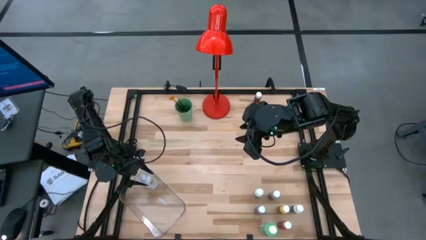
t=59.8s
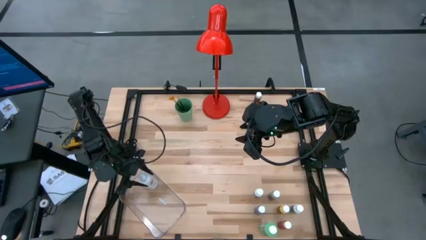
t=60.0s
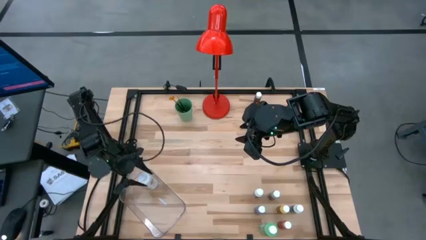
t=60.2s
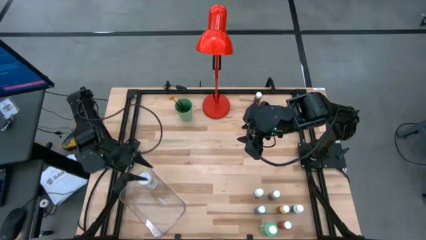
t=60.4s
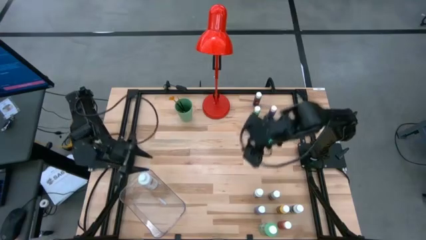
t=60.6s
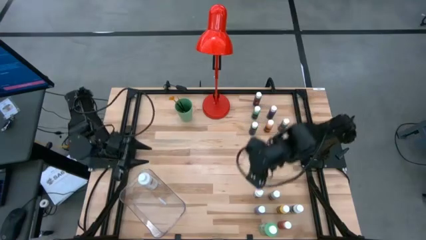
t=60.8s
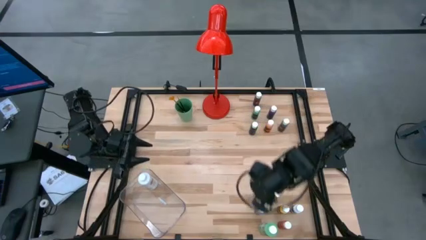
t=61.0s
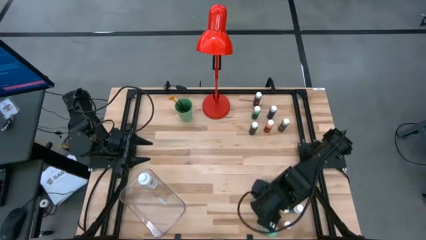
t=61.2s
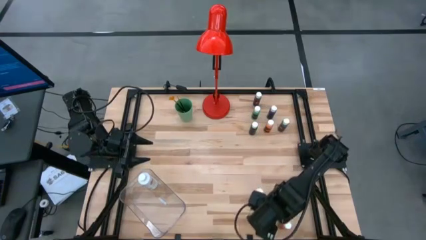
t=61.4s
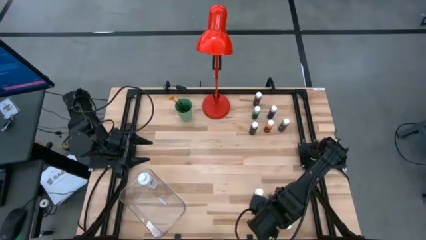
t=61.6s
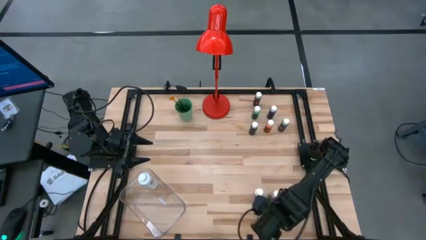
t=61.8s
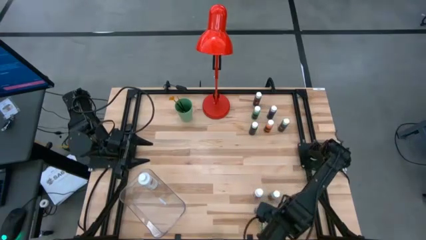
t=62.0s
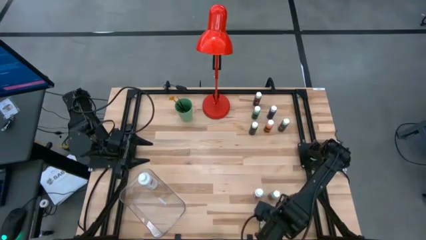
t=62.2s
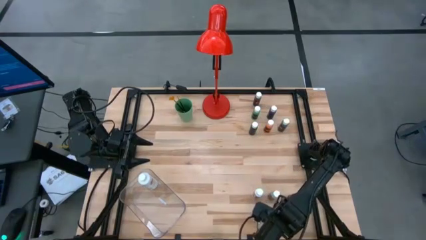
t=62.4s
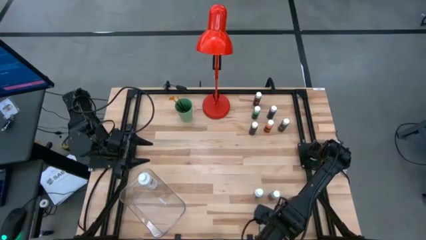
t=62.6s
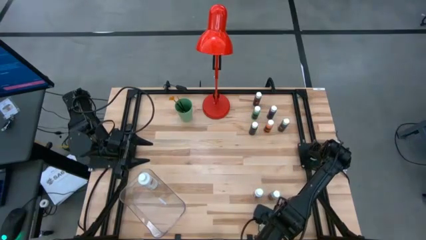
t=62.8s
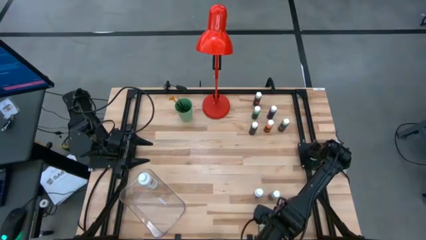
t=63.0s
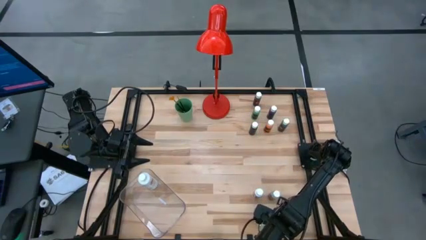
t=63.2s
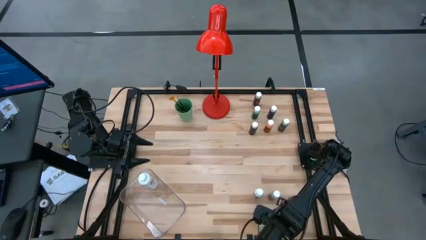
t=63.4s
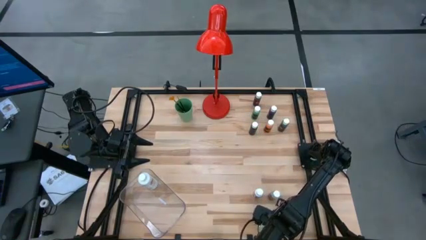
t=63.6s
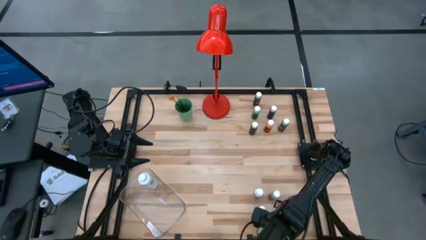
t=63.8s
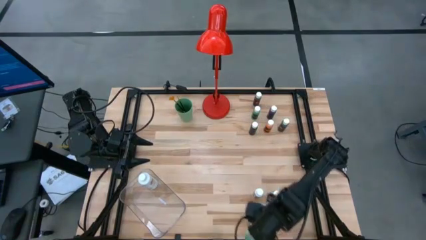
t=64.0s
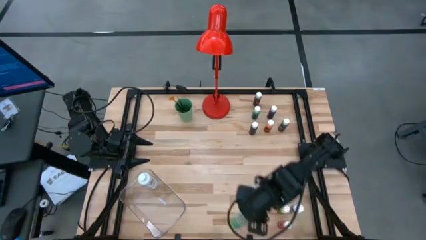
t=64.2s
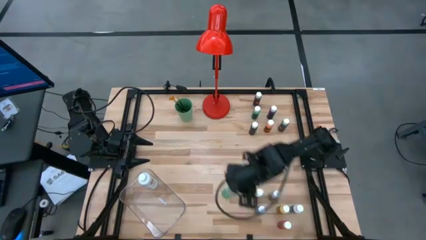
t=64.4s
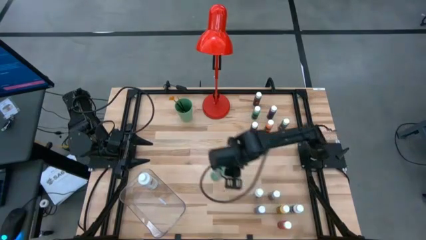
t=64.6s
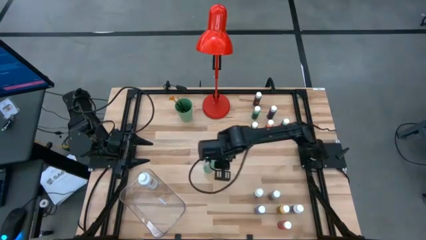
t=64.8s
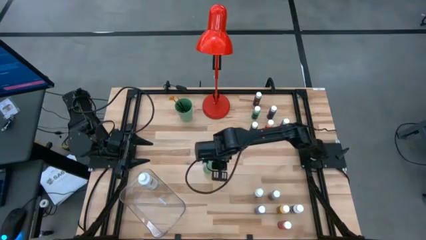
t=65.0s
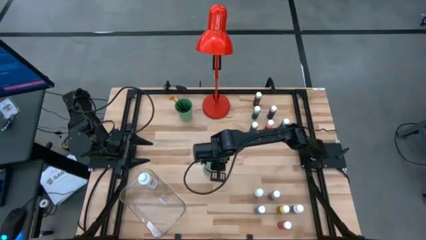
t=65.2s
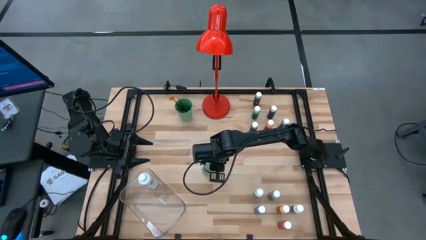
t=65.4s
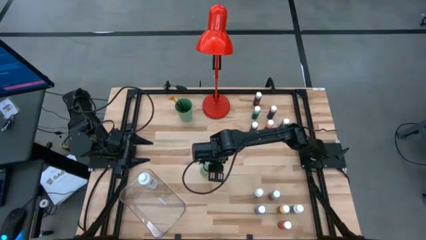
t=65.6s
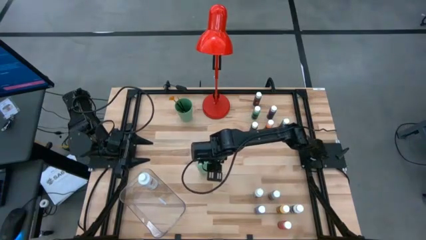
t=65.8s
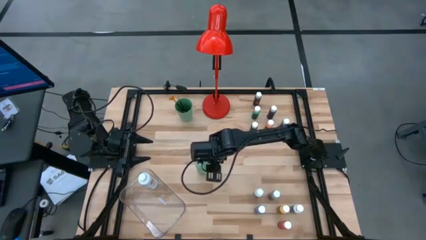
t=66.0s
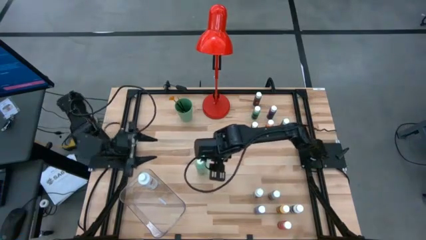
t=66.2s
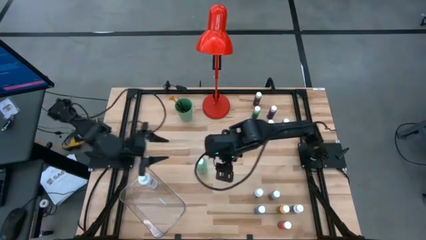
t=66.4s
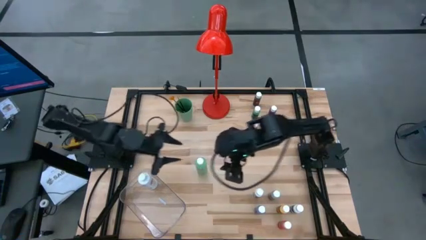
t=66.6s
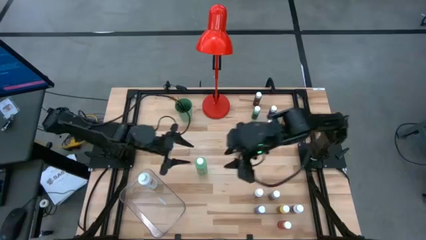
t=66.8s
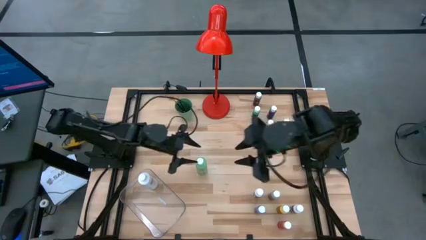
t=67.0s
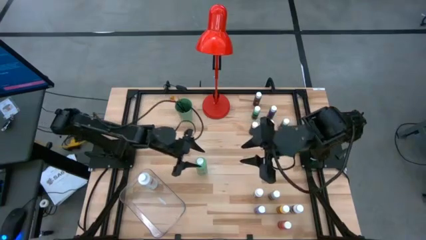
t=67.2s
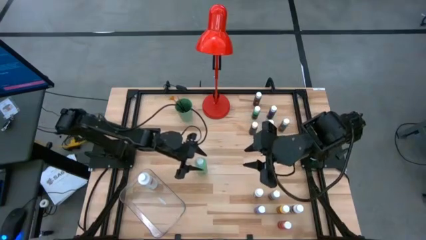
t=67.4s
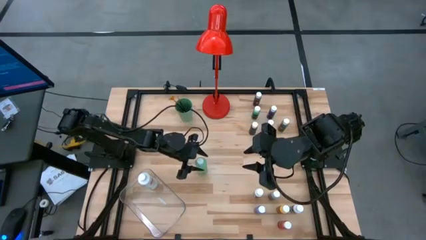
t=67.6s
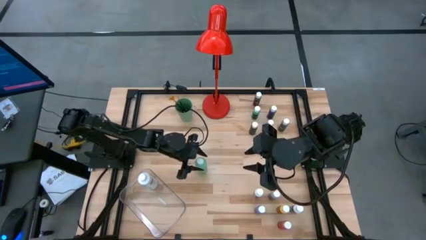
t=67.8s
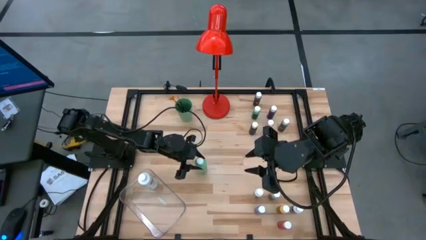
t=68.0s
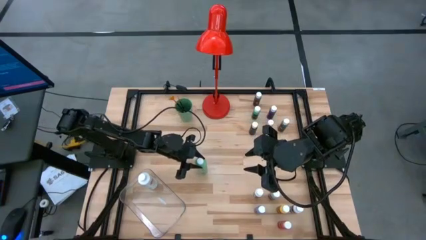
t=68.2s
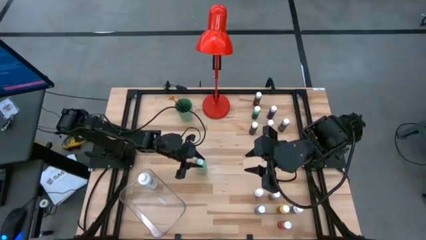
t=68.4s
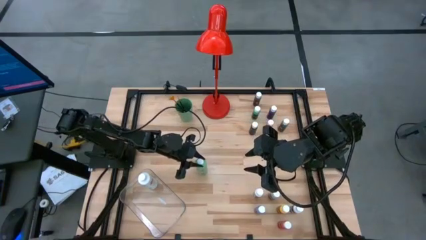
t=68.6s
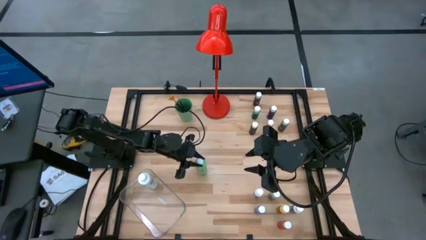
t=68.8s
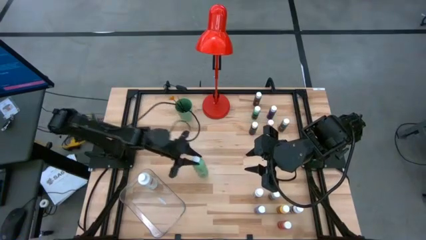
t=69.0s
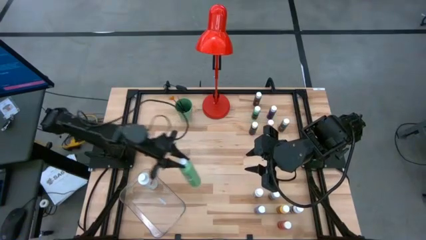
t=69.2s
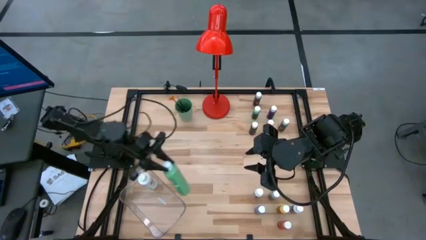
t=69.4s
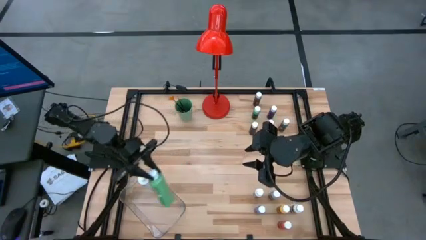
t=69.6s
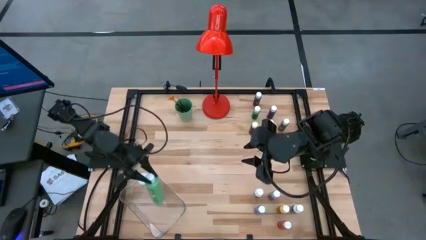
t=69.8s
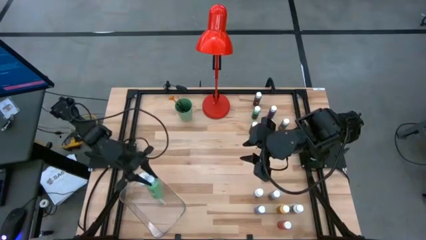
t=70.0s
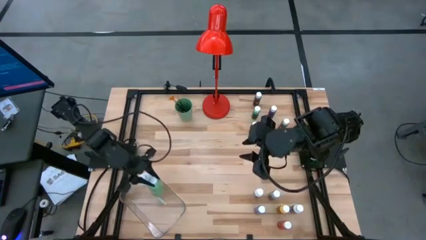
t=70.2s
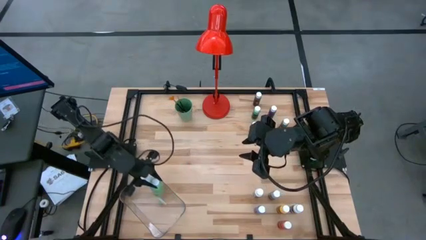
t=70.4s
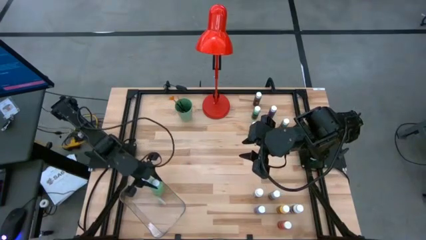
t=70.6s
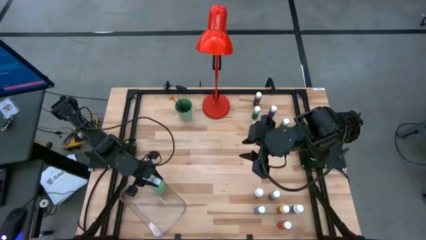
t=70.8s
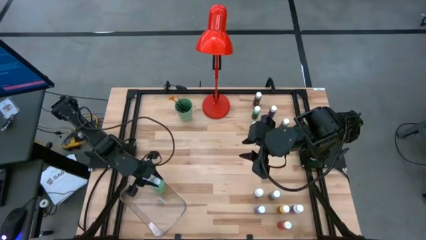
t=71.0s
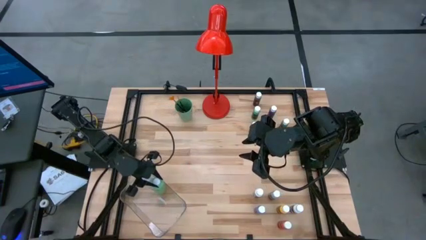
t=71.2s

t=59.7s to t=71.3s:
Task: Pick & Place Paint Supplies
Put the big green coloring bottle into the transparent bin

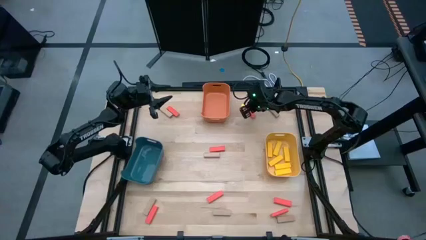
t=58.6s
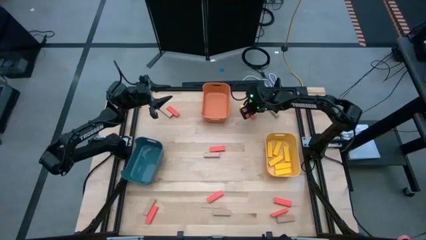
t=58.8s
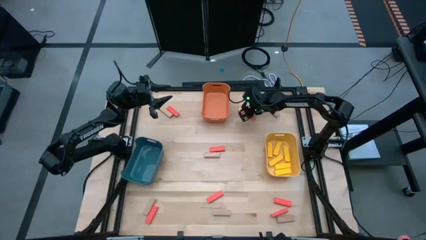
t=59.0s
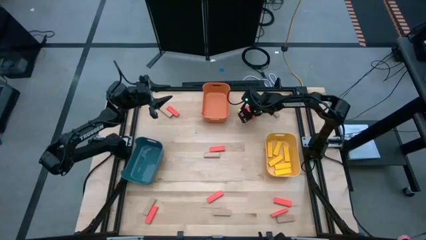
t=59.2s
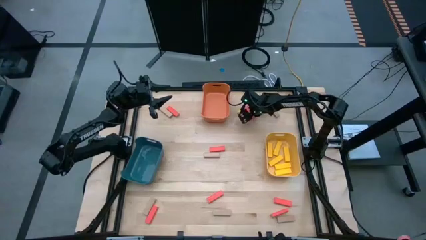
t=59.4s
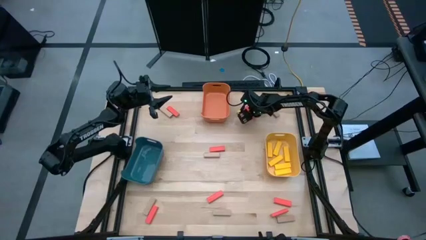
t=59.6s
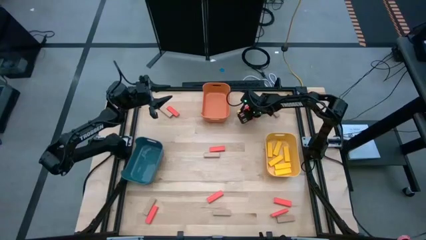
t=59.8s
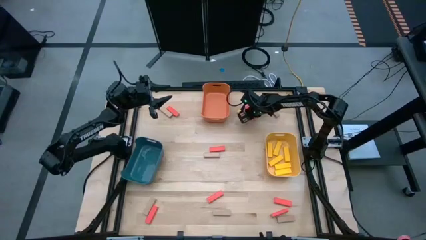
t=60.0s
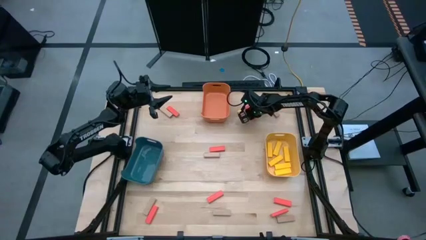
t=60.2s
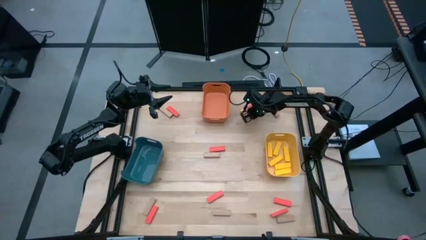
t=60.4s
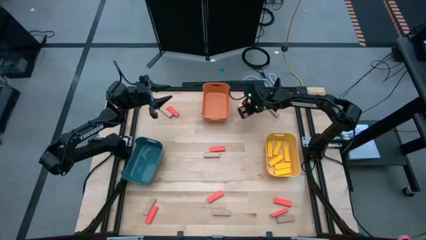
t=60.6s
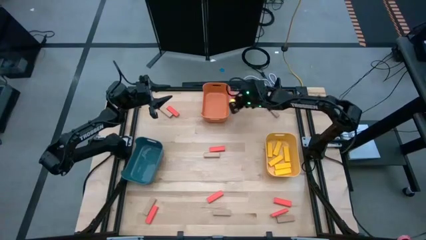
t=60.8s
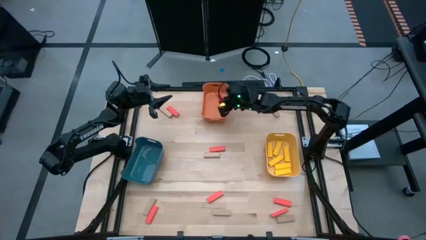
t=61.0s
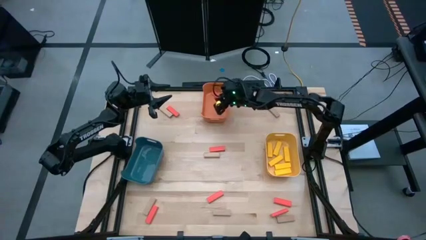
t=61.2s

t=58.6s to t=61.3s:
Task: Sort blocks
Put the top right orange block into the orange bin

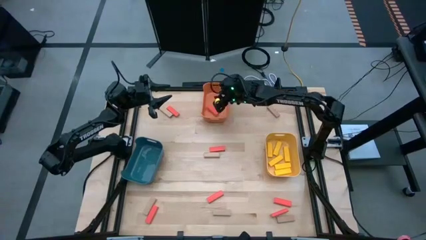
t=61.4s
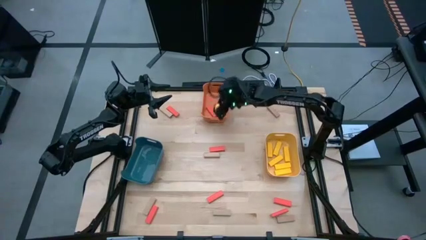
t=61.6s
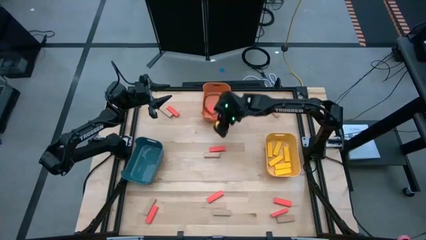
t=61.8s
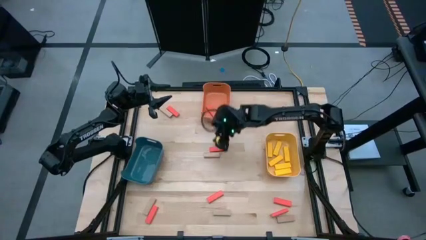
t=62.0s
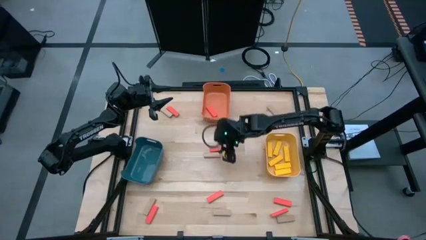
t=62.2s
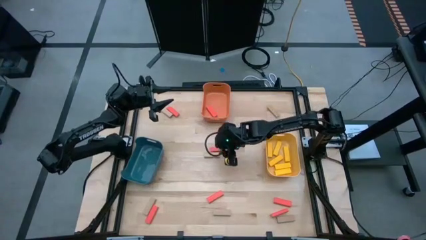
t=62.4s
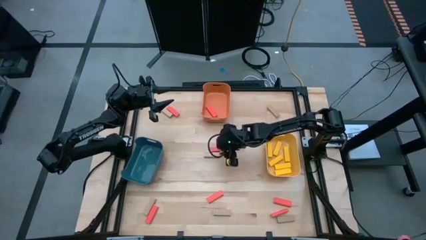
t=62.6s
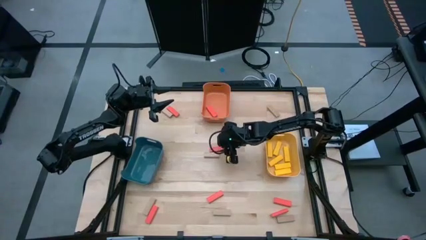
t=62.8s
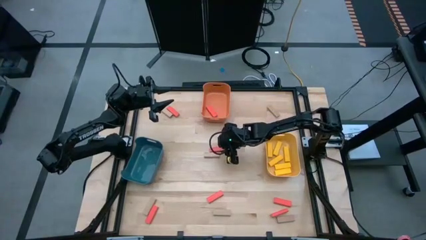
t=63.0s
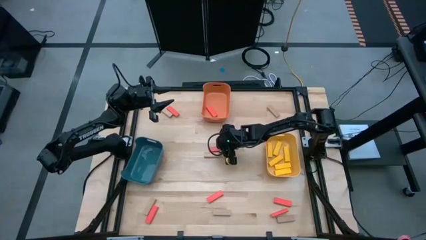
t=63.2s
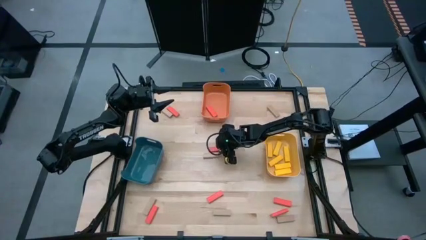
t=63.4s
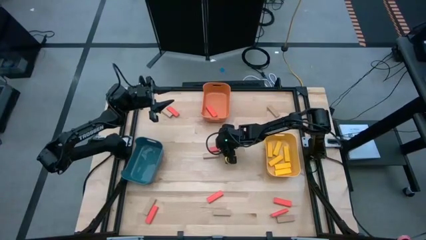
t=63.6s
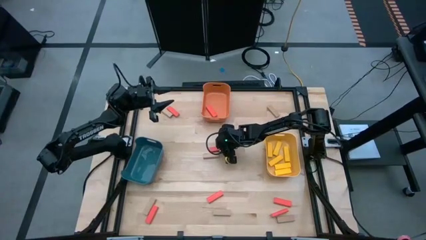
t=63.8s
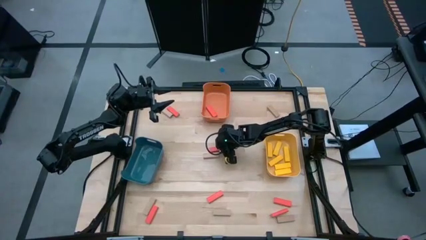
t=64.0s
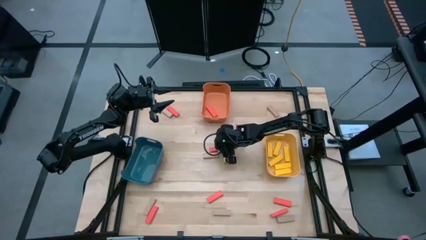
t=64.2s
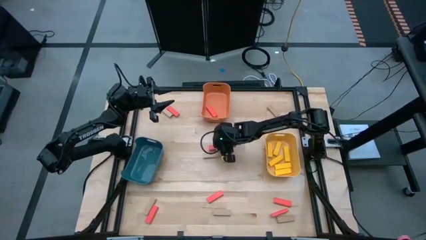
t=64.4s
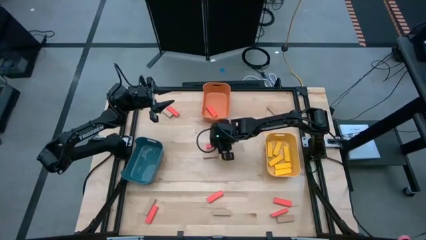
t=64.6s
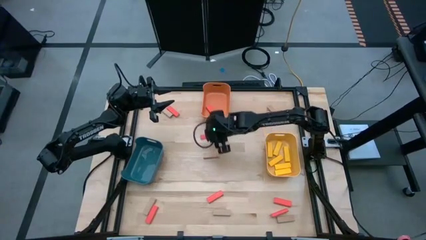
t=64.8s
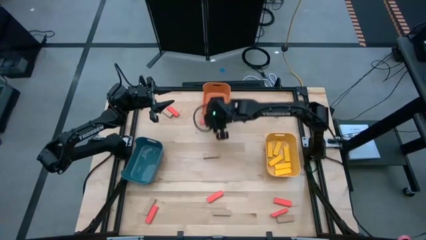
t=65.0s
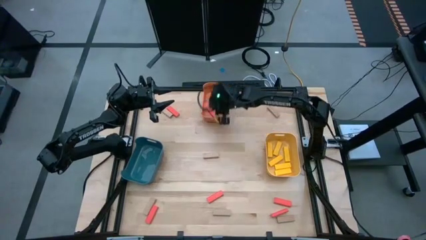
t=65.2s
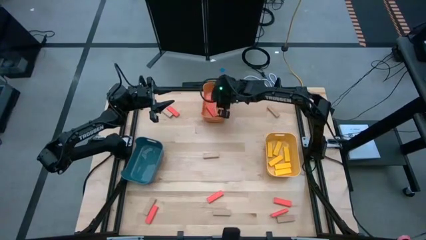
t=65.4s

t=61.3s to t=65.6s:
Put the center orange block into the orange bin
